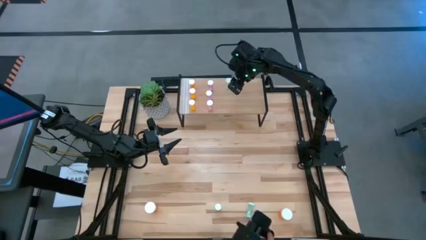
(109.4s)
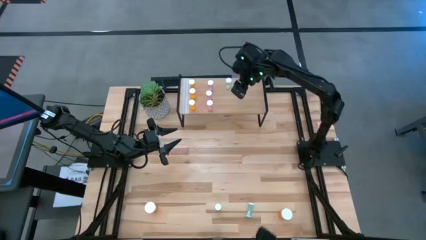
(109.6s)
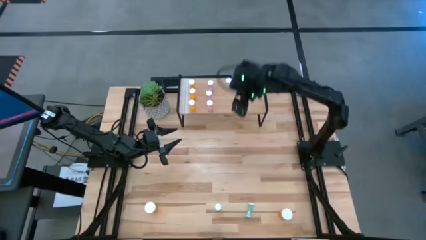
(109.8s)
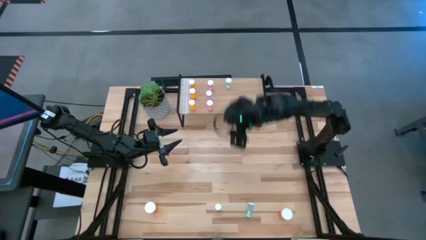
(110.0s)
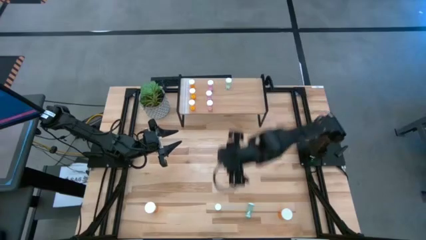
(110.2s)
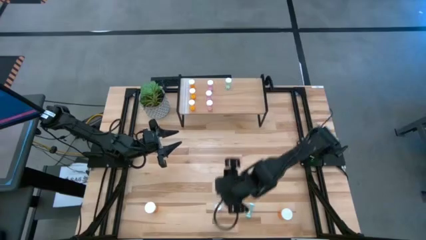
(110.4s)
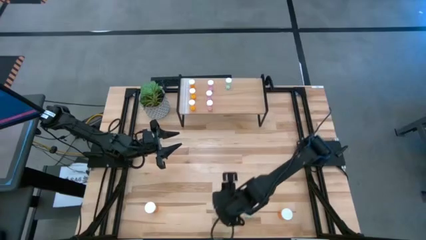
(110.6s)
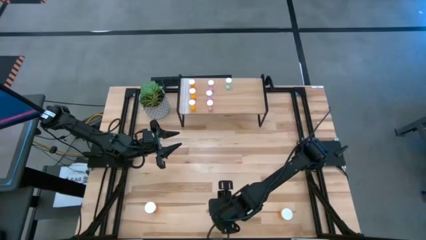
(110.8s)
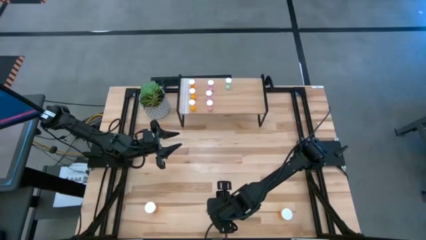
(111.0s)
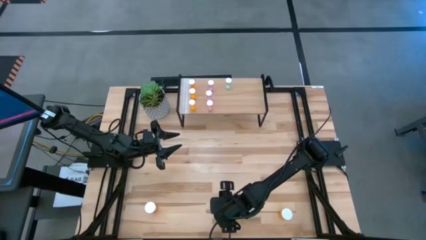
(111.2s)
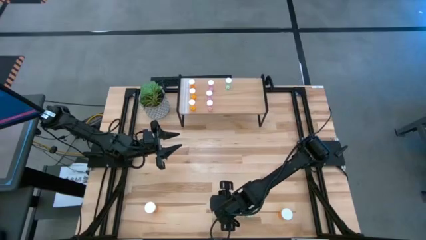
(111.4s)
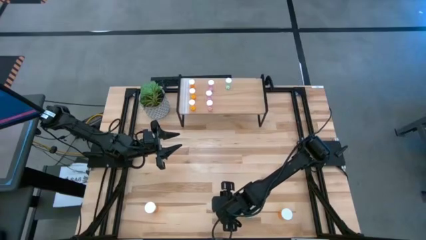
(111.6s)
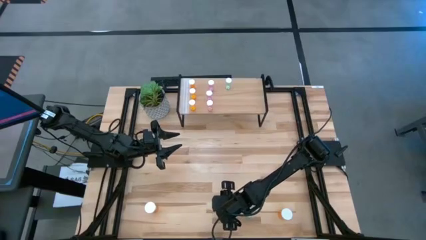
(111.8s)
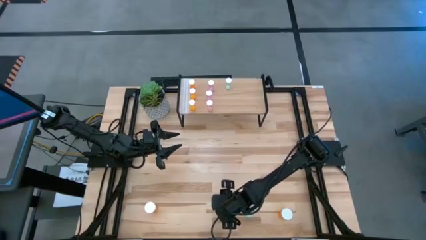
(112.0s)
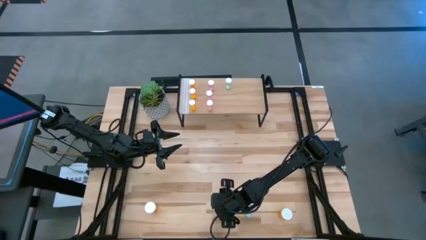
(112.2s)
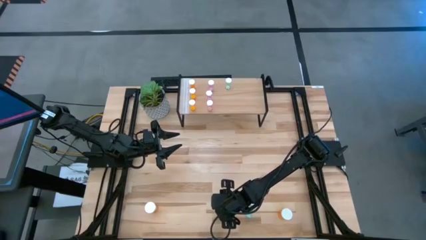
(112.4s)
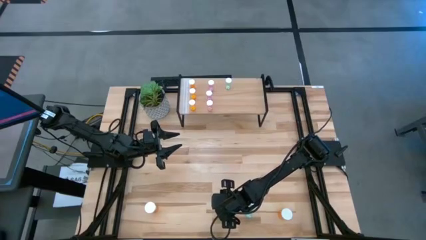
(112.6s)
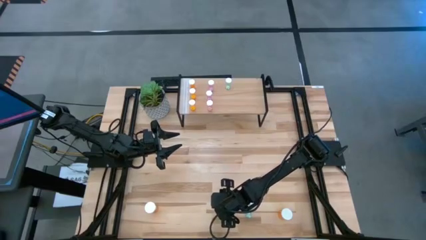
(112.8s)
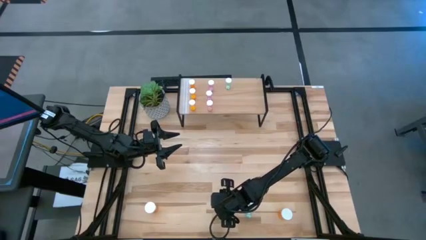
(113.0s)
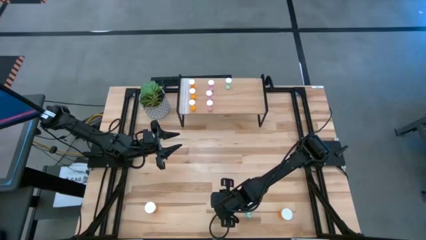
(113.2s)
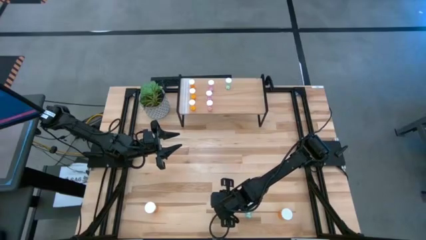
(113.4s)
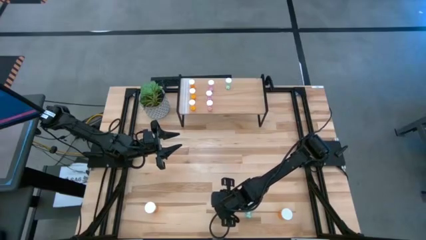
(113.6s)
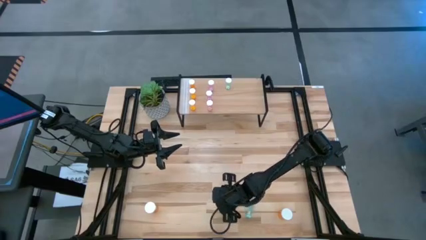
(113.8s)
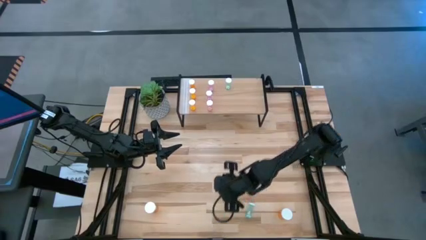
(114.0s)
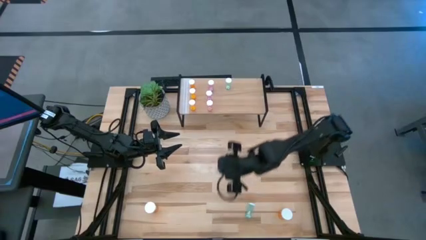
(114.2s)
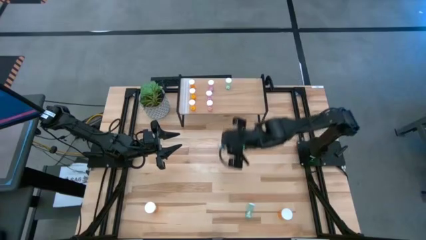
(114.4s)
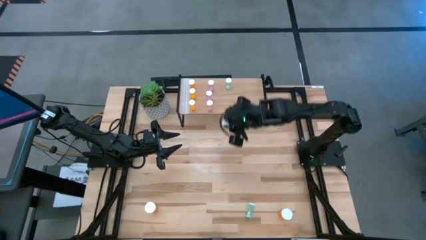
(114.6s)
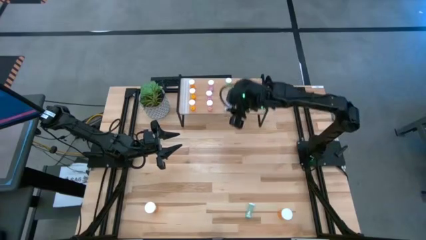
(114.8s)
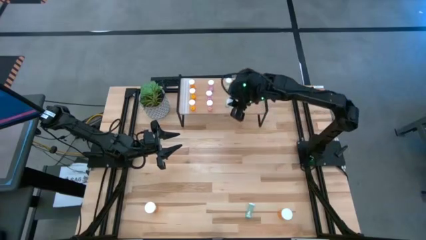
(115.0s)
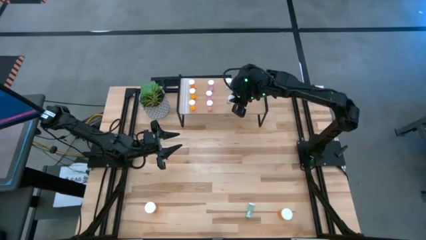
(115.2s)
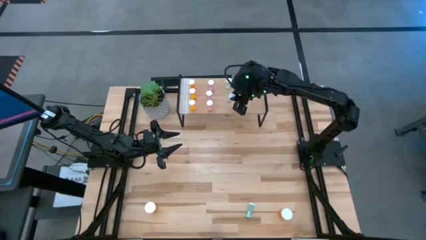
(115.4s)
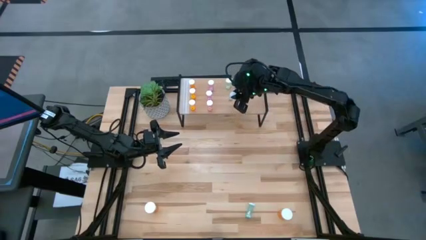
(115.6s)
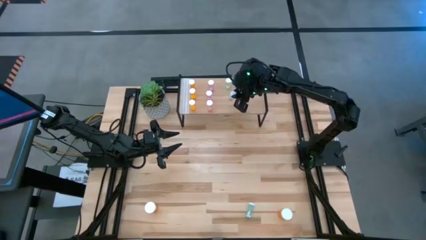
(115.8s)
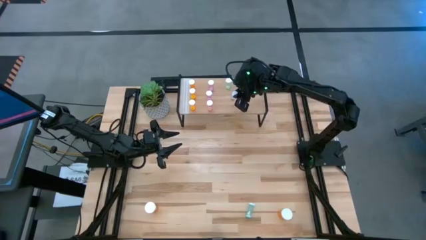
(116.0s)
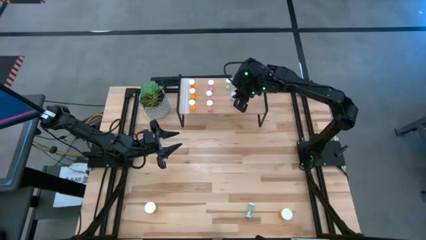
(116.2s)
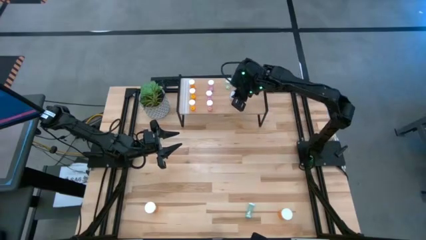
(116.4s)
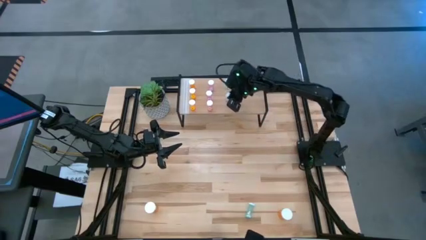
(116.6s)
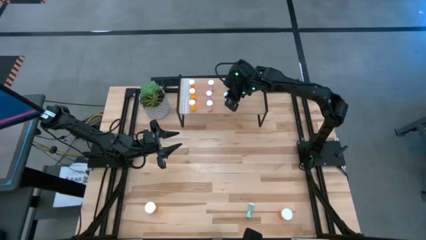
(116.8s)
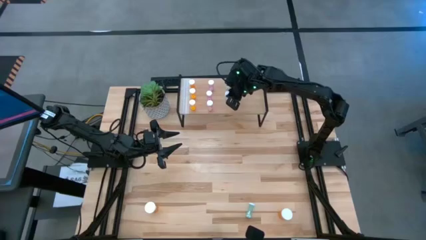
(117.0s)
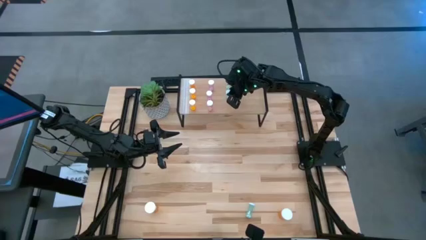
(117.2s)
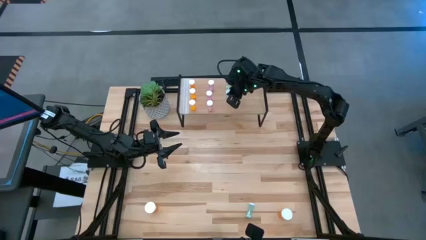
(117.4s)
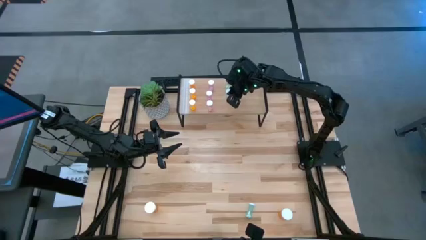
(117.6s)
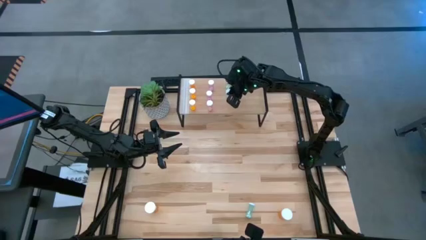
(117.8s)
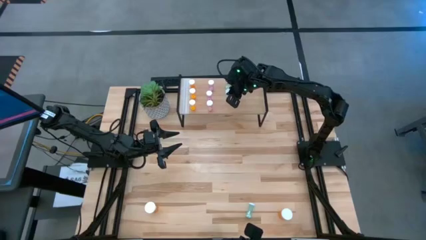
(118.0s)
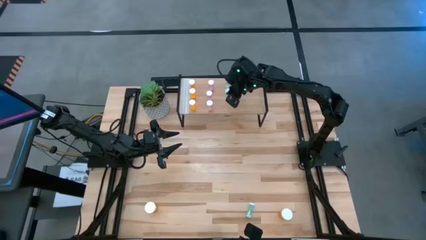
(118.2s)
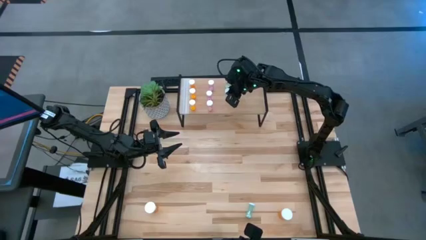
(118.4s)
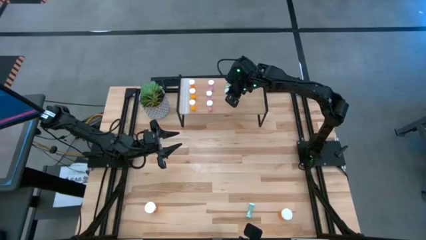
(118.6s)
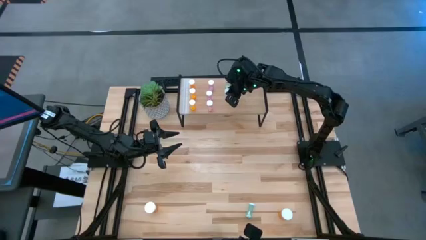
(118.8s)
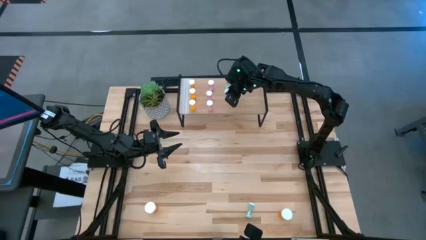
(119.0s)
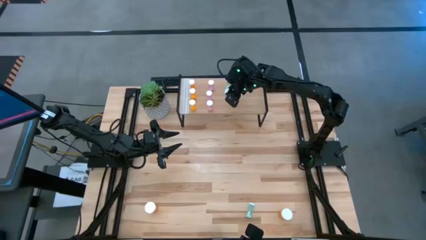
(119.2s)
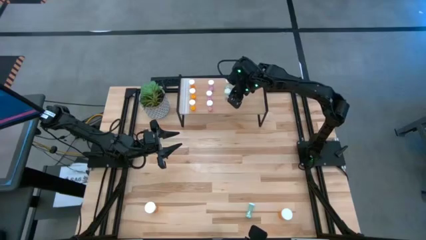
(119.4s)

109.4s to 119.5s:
Task: Pick and place medicine bottles onto shelf by color
Put the left green pill bottle on the shelf aligned with the other green pill bottle

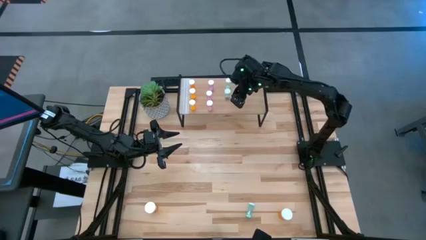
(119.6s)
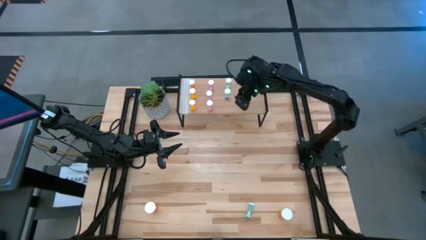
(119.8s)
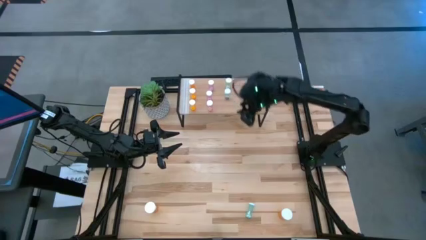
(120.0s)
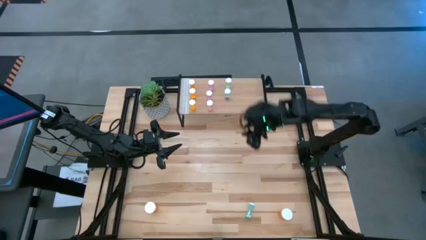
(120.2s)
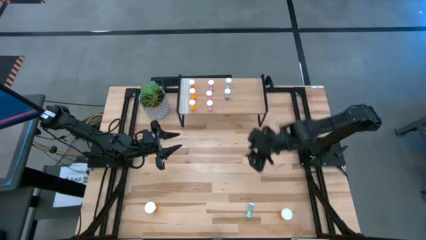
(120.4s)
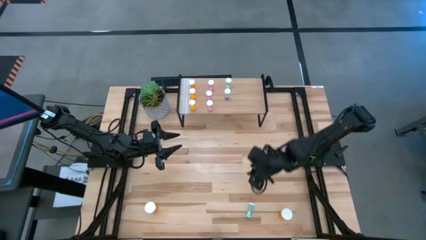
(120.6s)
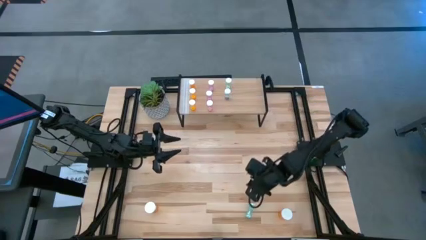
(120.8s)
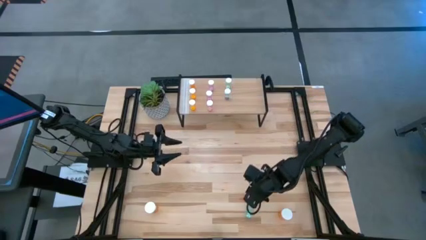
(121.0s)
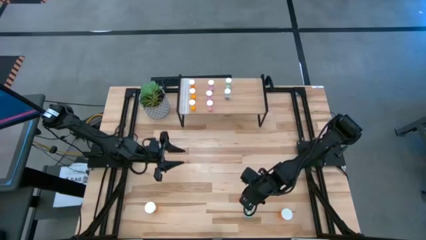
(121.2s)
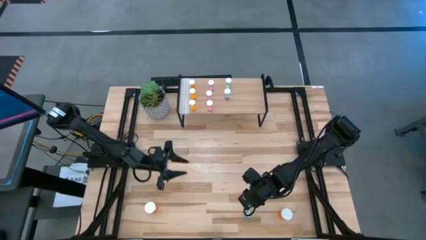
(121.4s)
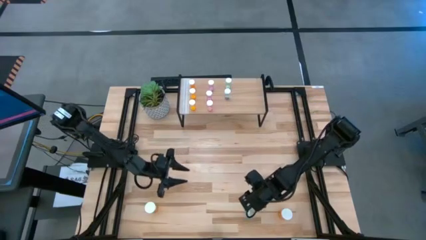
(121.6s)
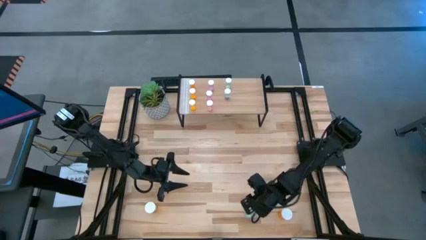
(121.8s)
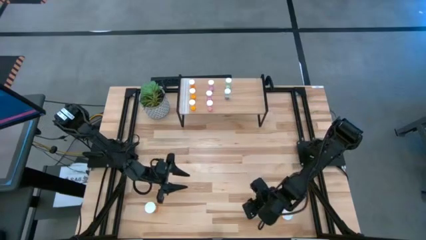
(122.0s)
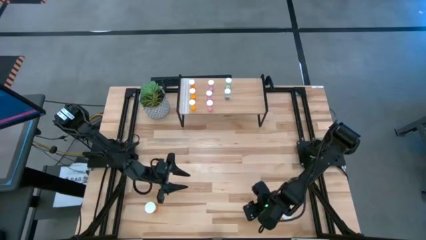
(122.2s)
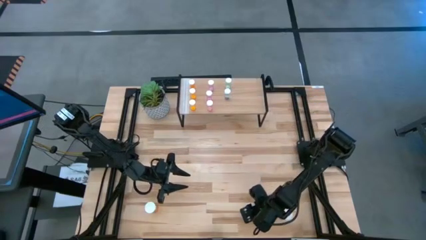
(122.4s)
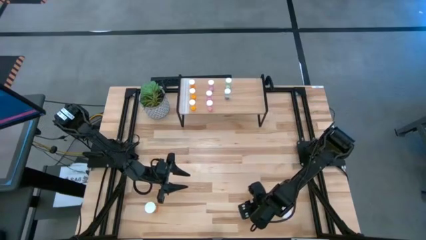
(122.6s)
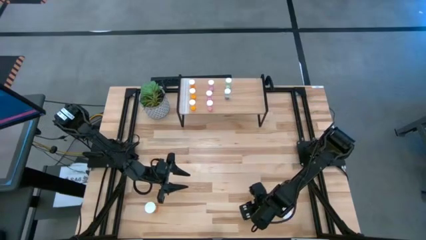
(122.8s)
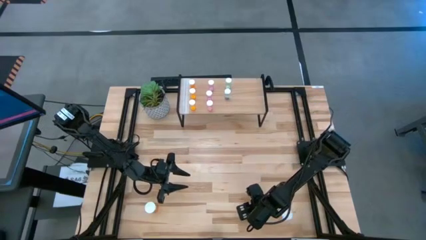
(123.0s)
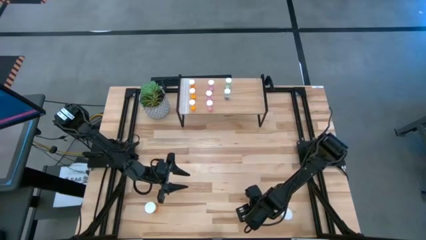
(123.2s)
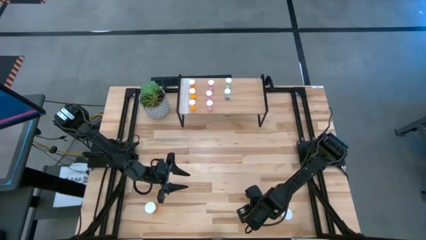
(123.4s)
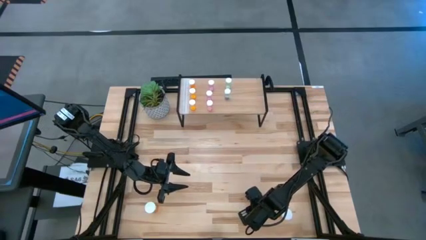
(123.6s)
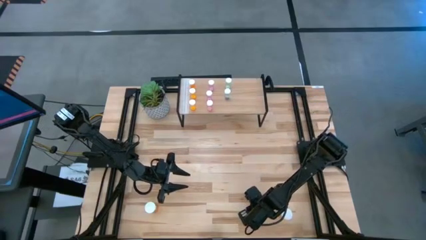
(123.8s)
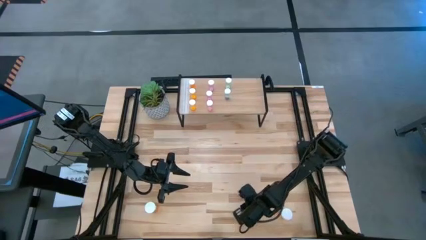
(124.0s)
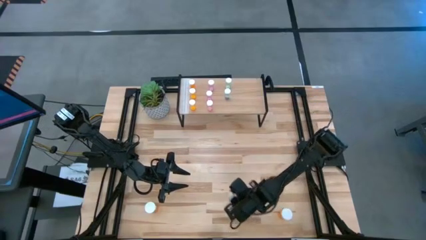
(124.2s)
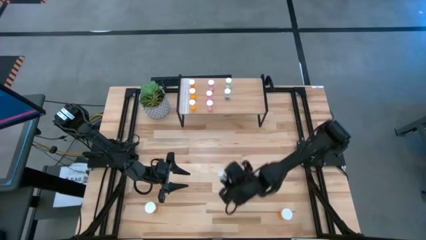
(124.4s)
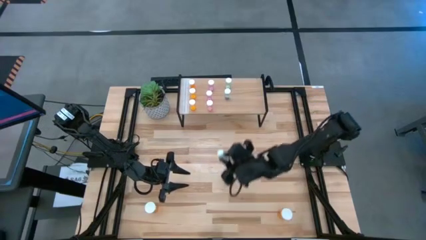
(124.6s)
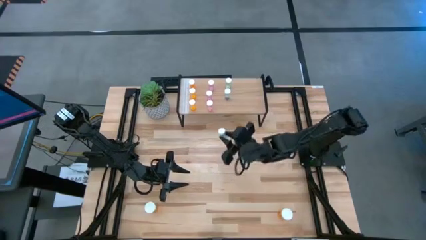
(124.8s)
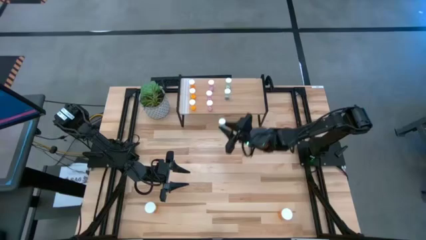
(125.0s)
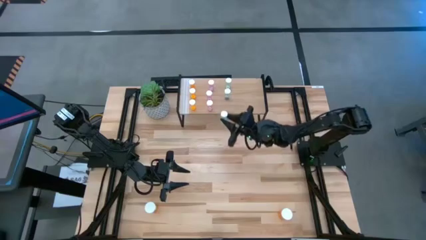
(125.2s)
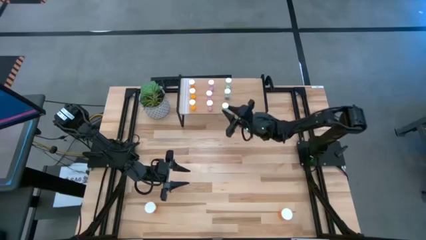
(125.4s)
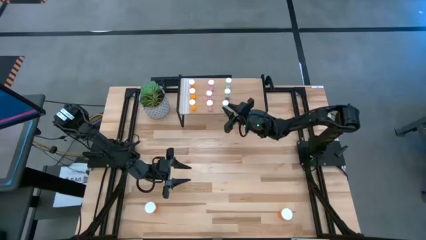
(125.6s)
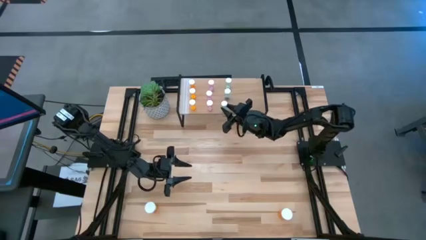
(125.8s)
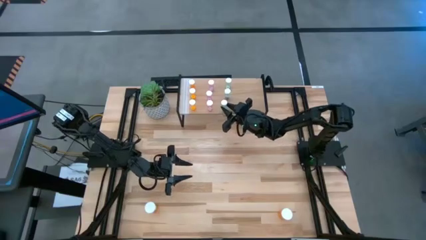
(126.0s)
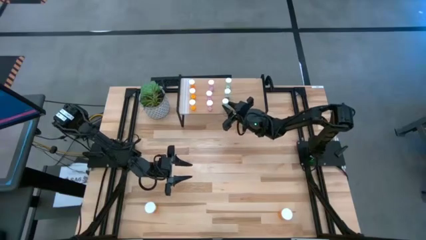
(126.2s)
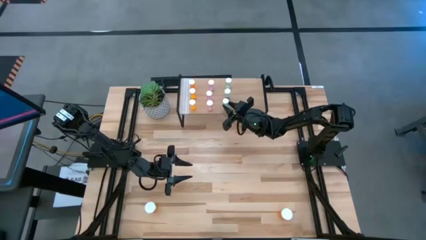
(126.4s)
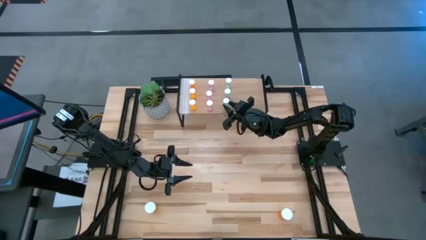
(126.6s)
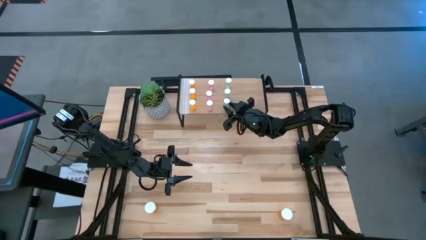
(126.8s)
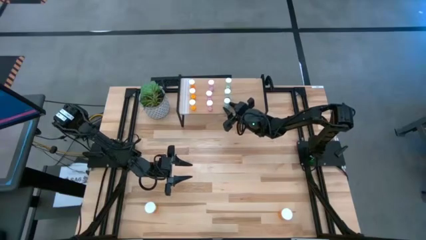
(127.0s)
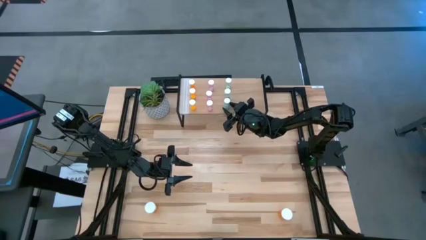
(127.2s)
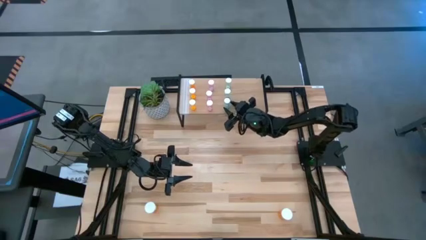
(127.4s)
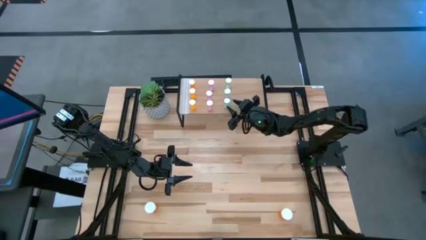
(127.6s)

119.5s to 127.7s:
Put the green pill bottle on the shelf aligned with the other green pill bottles
